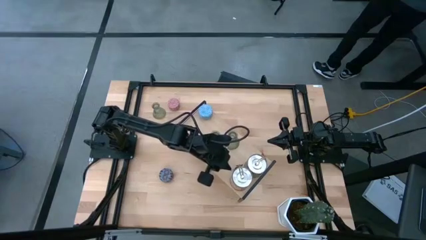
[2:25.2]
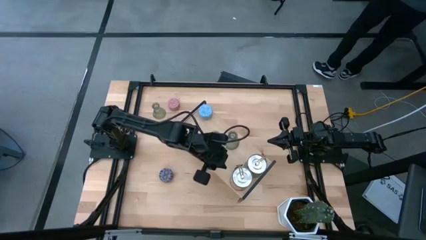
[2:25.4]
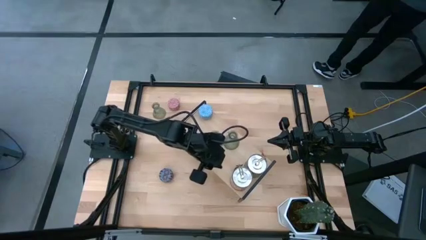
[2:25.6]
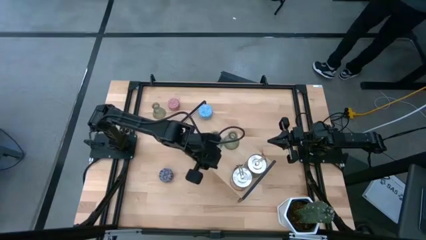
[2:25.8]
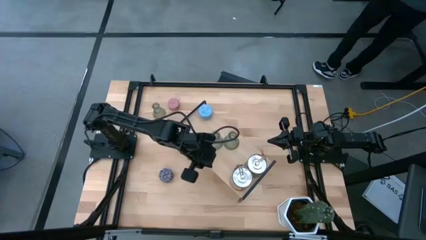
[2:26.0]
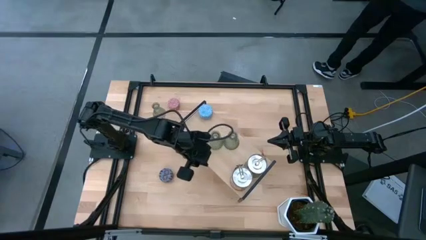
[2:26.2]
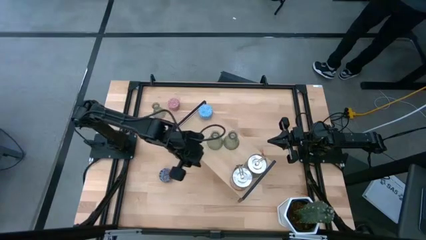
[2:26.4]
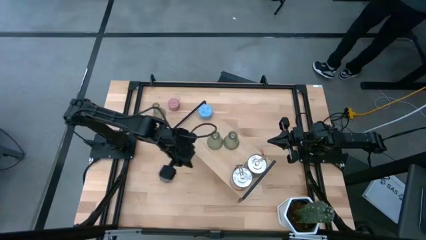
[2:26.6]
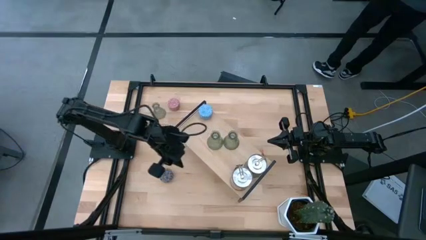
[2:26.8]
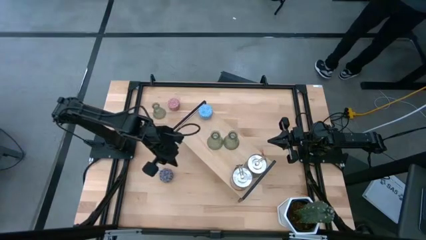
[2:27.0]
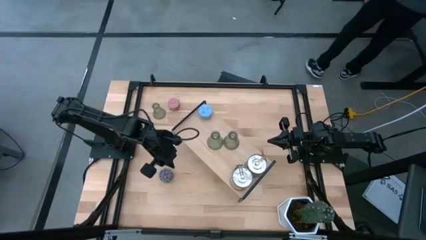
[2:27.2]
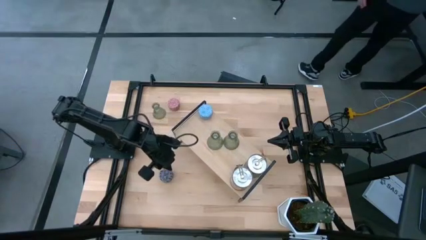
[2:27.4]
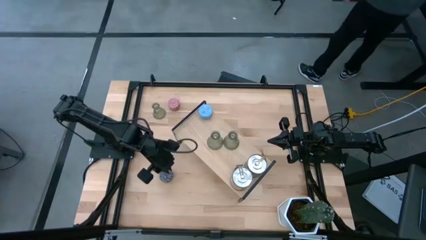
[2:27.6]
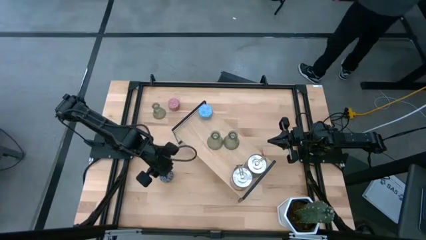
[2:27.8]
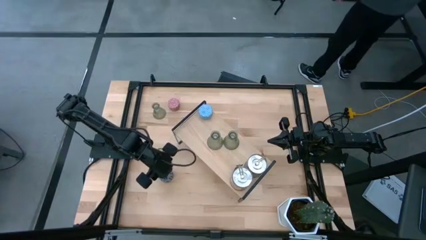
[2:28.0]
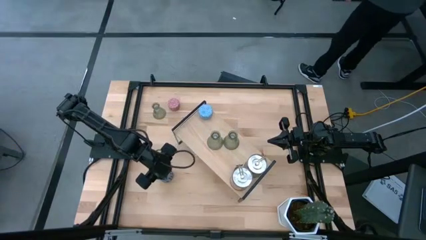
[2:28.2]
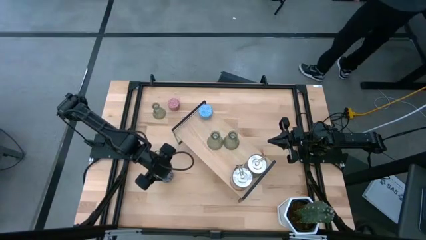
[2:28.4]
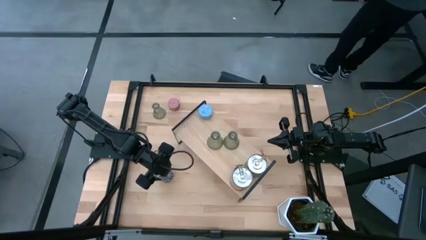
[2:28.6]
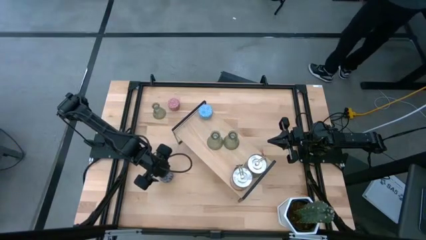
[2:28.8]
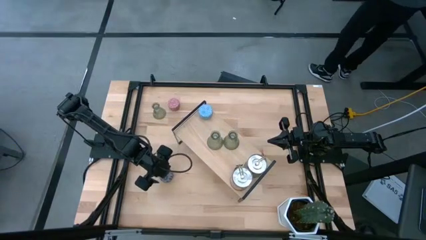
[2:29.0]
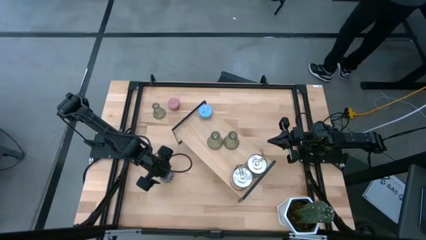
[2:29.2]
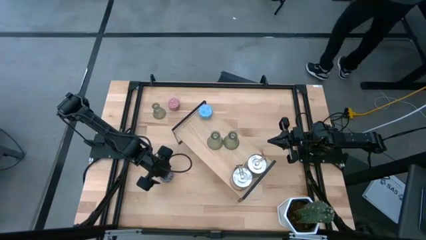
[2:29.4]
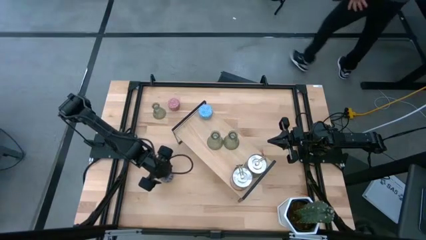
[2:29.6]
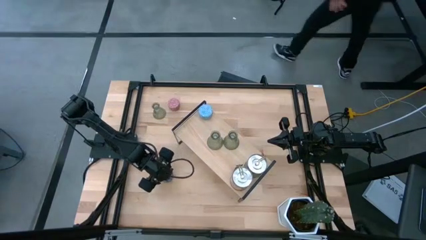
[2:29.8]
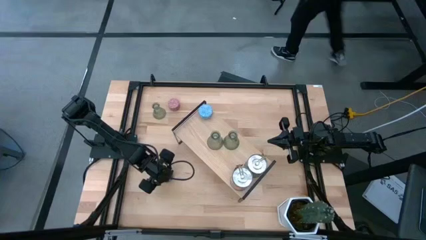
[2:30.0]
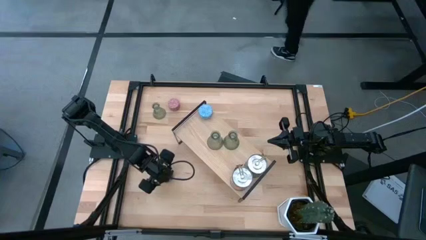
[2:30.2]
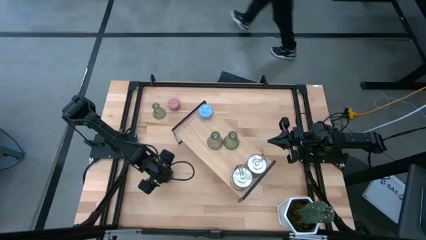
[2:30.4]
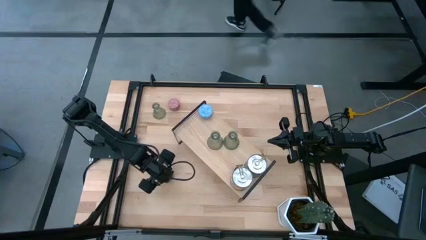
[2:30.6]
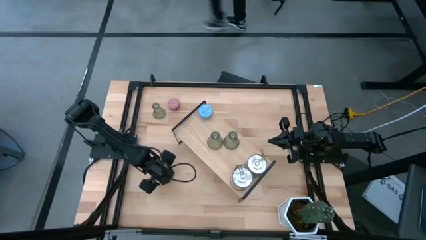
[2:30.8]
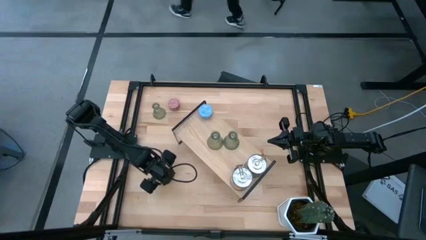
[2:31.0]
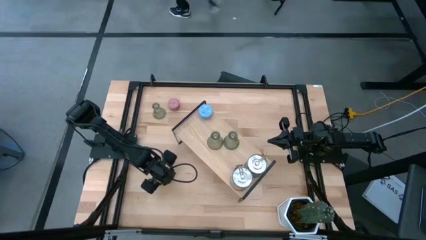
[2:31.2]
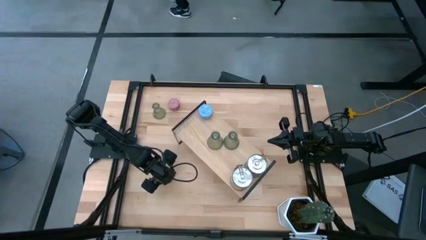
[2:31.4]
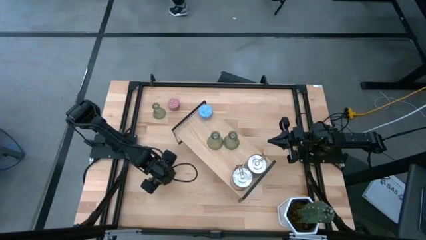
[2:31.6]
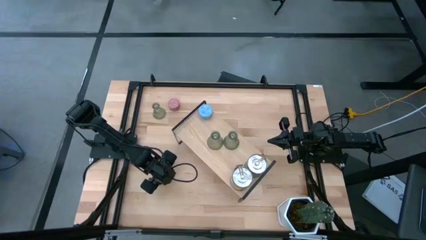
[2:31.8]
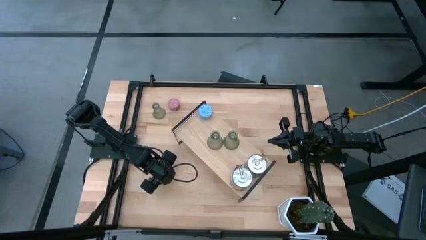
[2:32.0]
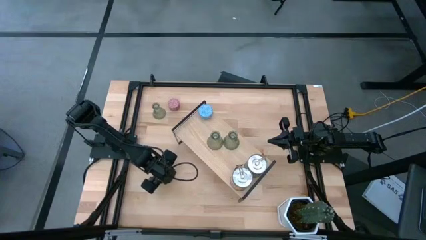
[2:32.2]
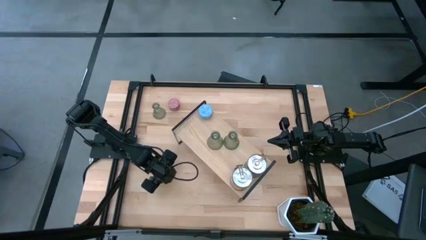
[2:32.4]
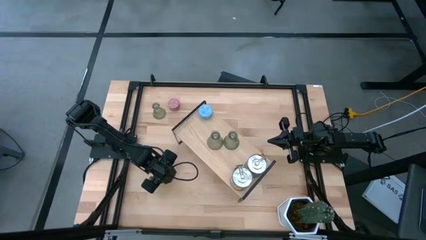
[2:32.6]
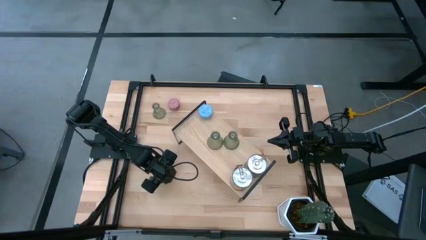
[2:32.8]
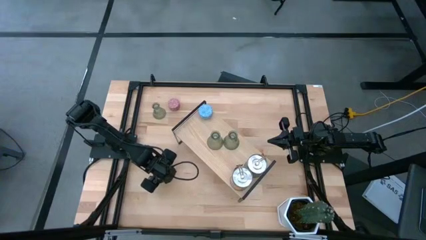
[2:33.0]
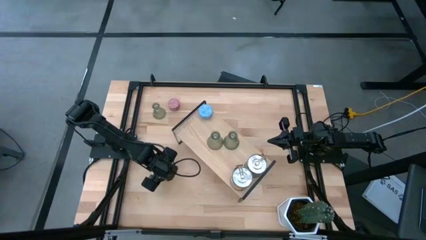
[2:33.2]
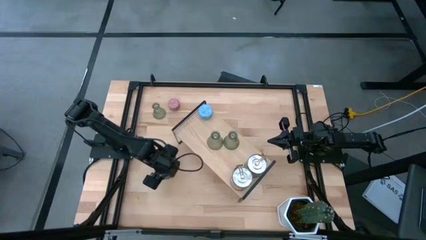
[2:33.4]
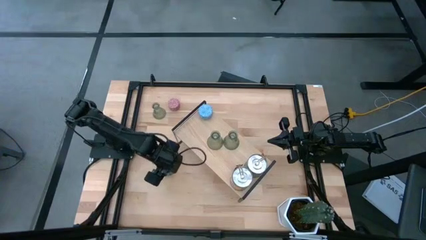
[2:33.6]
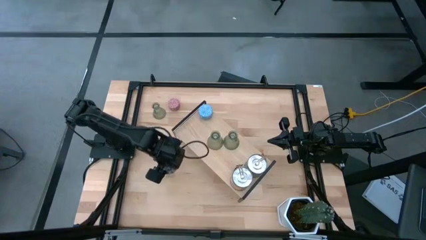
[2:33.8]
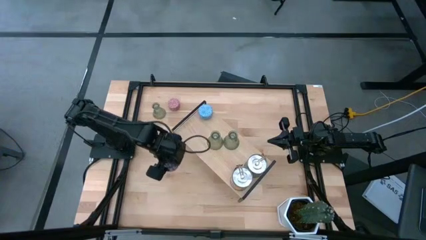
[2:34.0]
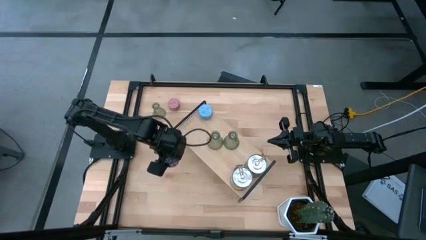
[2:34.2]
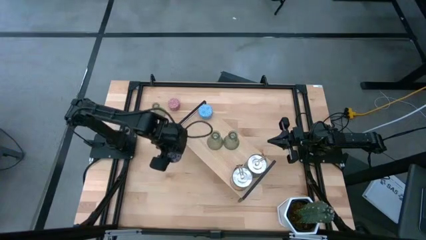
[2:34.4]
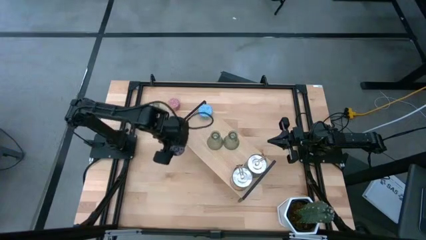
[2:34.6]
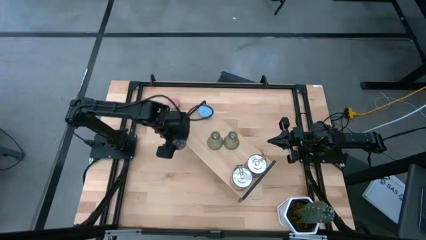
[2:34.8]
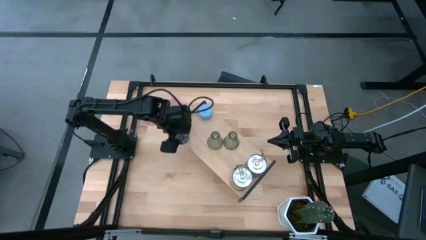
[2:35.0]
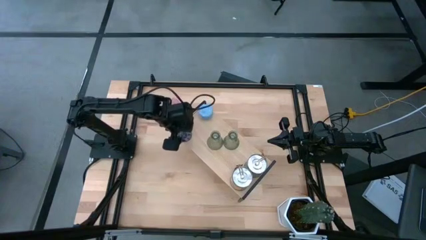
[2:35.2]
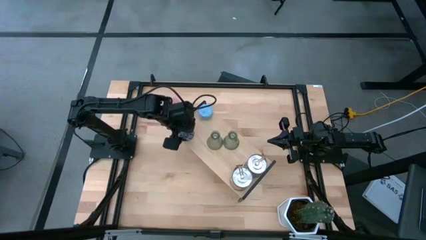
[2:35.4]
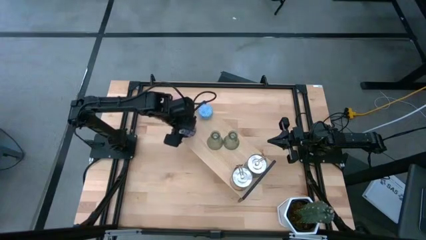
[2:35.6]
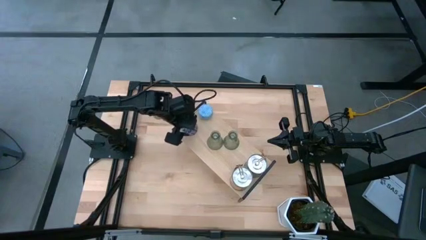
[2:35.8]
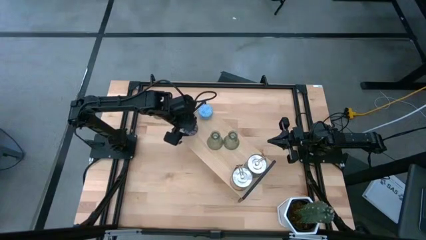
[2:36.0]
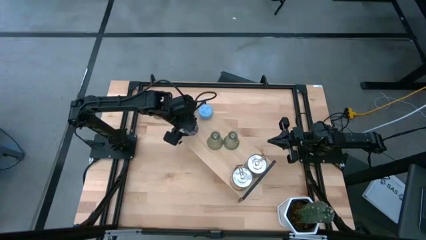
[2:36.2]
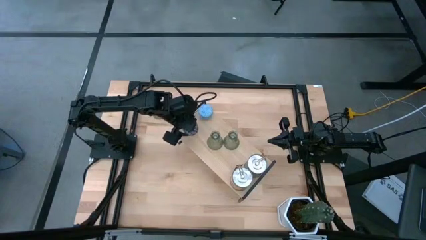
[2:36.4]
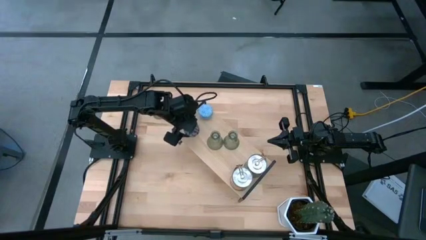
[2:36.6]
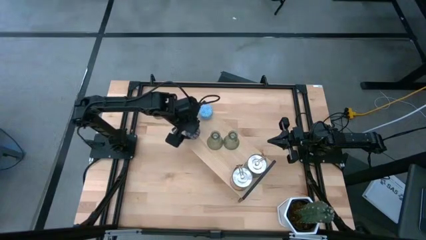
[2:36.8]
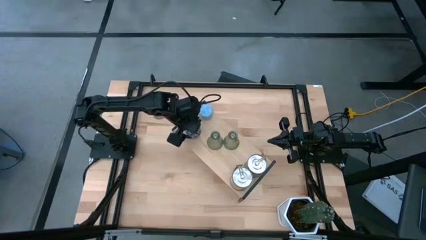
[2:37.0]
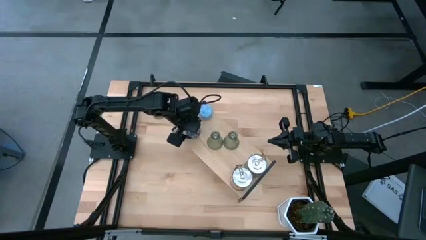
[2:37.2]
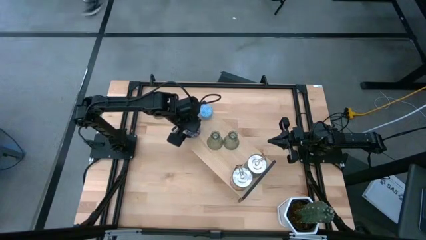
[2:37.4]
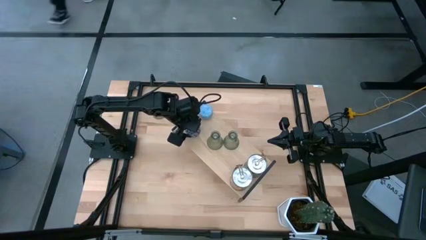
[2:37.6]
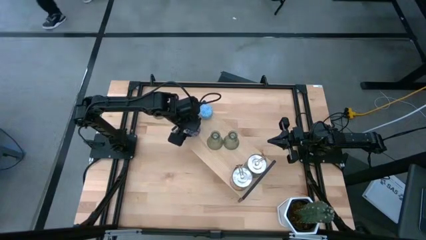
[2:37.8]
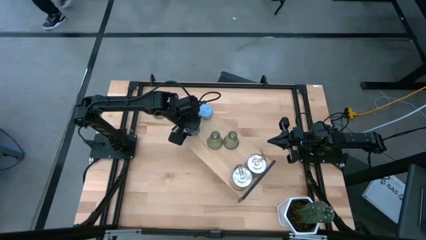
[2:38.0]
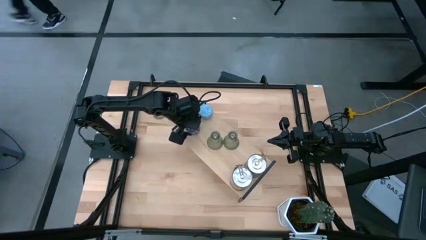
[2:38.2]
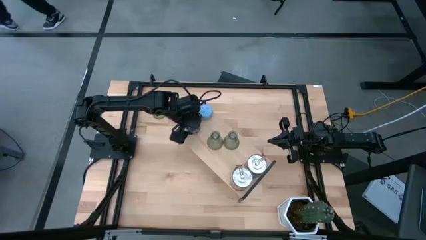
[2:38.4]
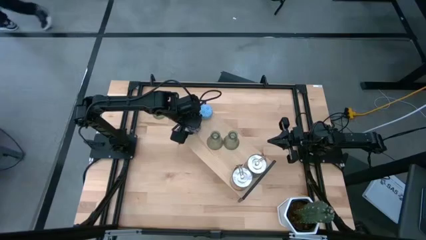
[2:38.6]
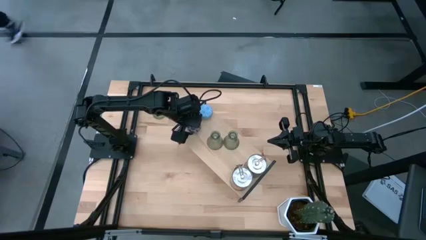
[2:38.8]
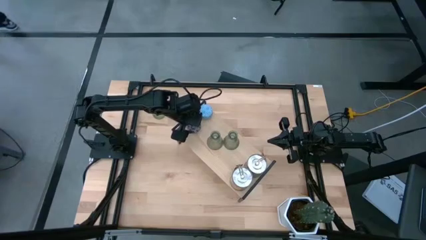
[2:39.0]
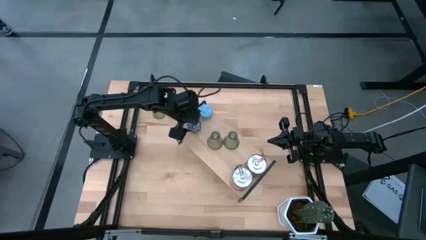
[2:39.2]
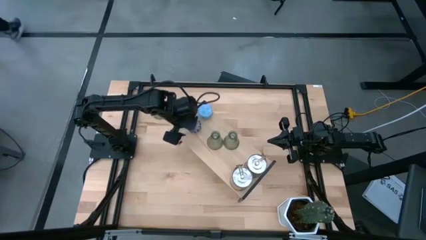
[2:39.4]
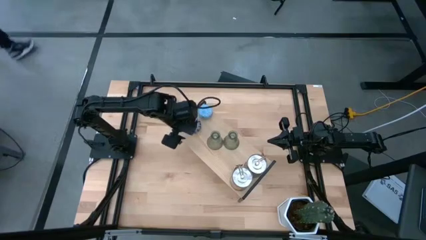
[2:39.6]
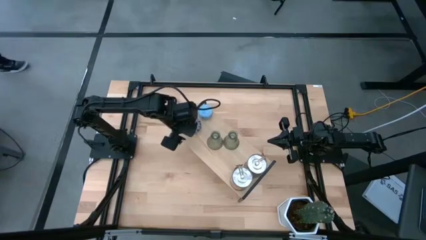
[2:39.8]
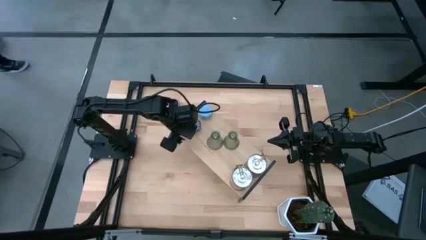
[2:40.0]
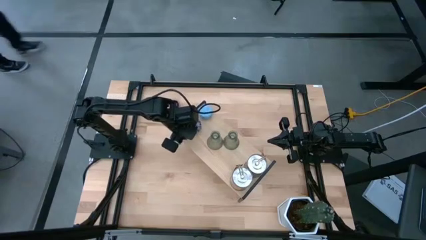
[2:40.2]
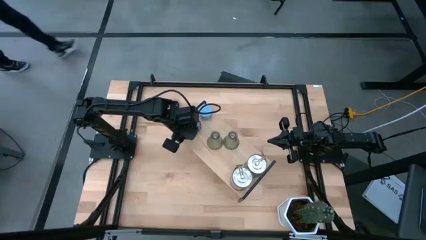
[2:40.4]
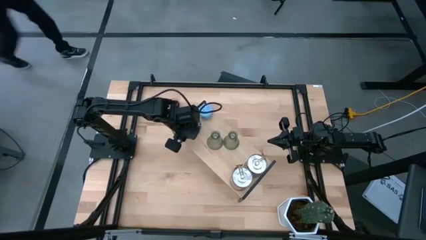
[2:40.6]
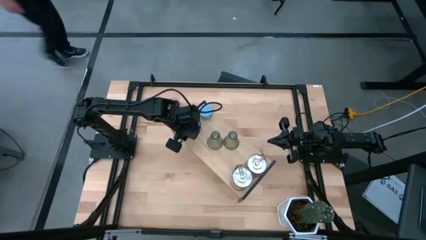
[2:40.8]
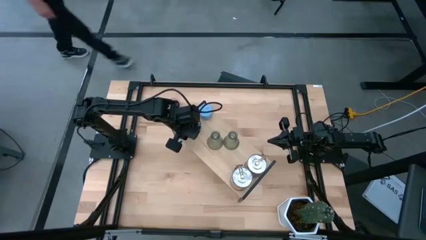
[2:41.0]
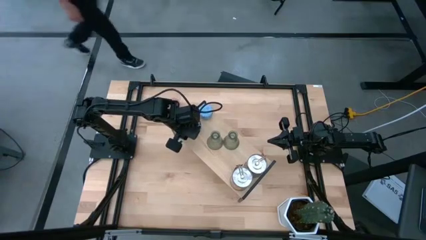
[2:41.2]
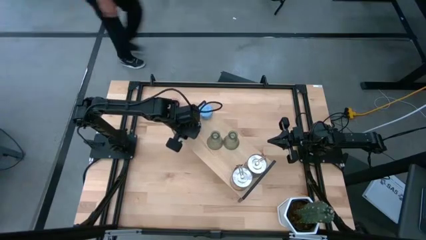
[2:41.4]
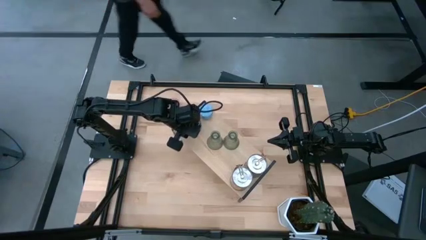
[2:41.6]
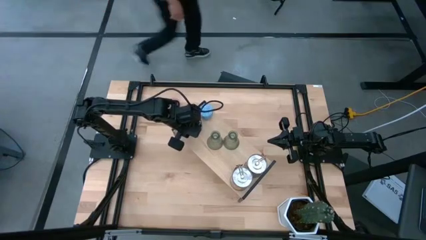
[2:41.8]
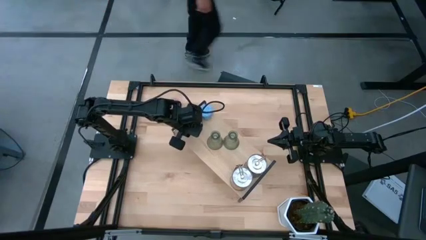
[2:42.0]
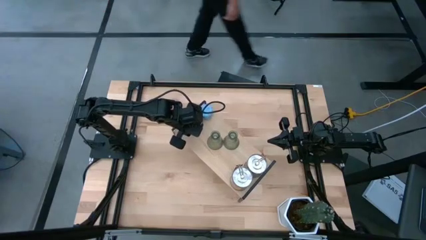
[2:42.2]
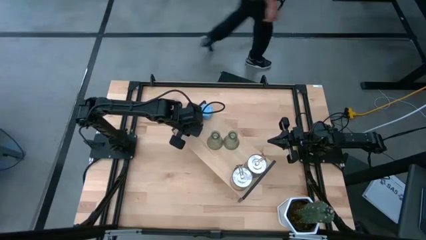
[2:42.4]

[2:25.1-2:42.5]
Task: Pick & Place candle stick holders
Put the black red scented candle on the shelf
